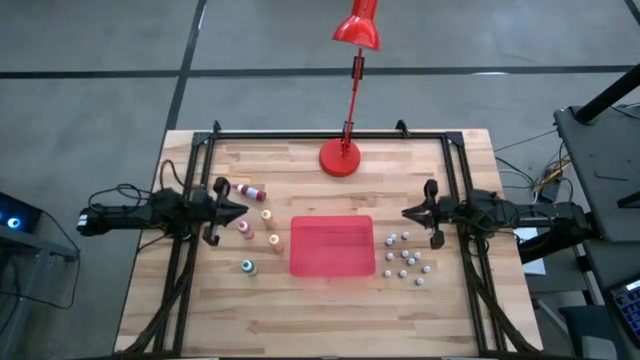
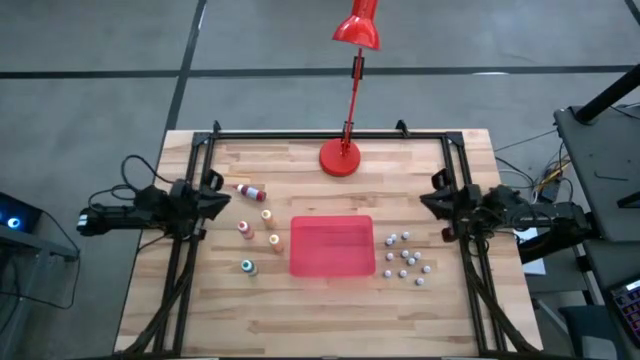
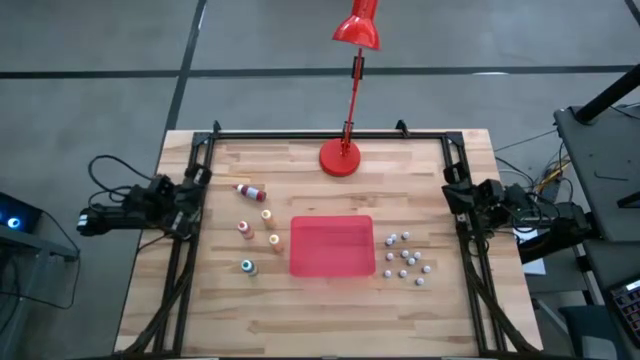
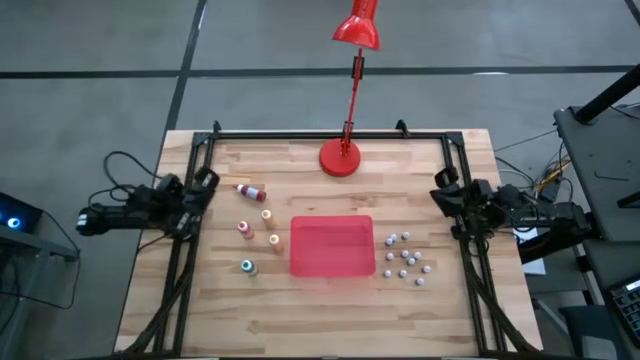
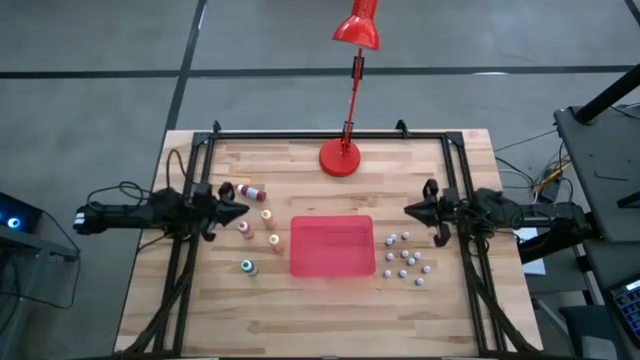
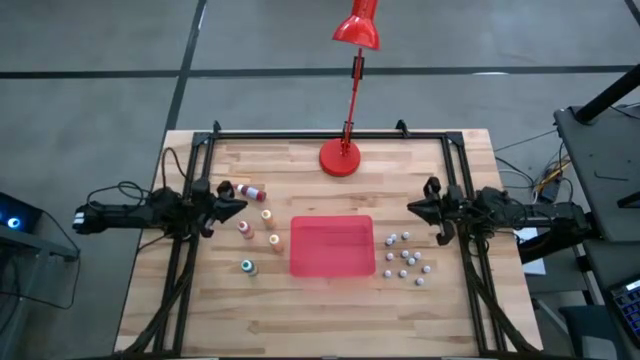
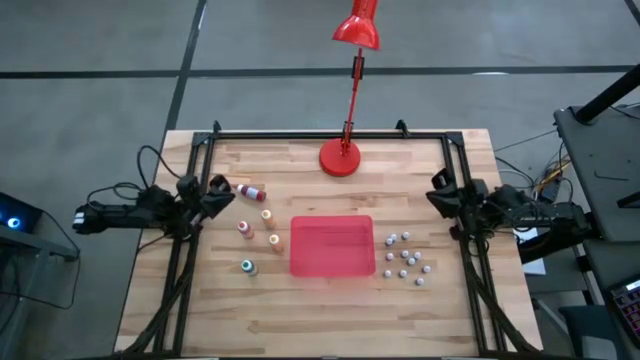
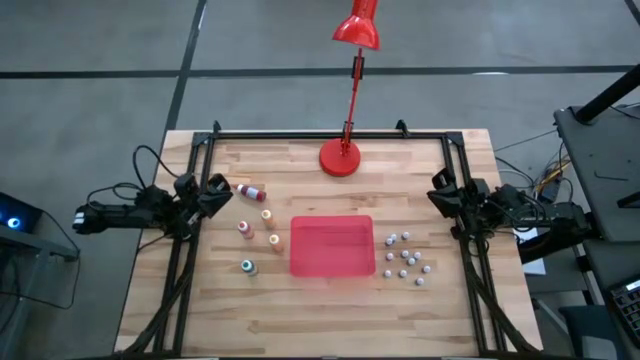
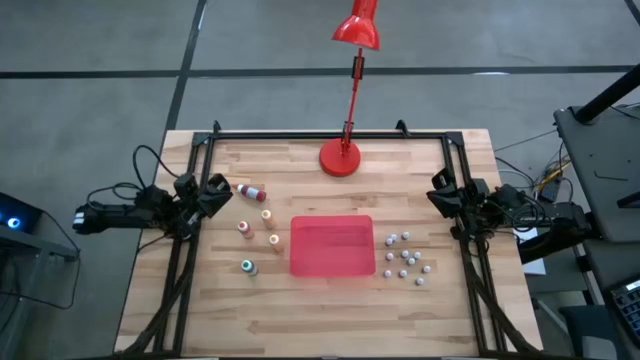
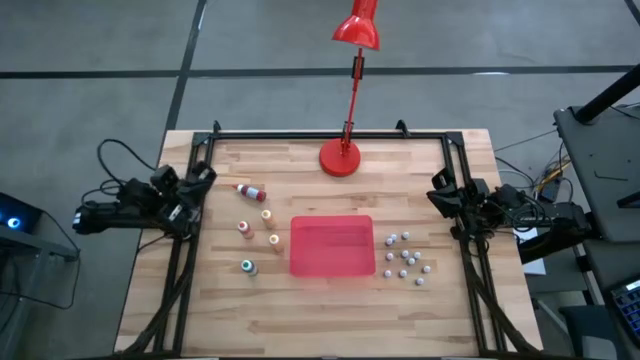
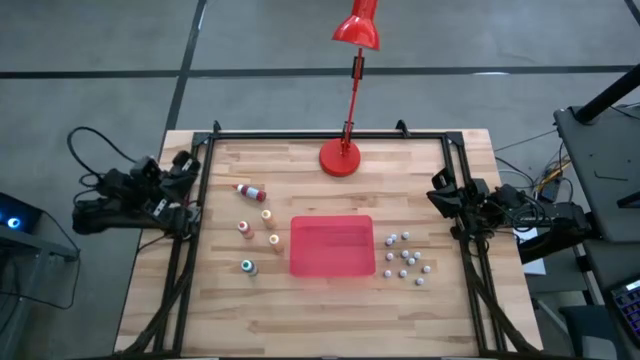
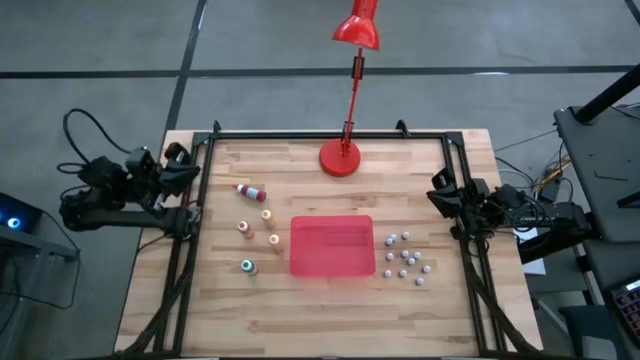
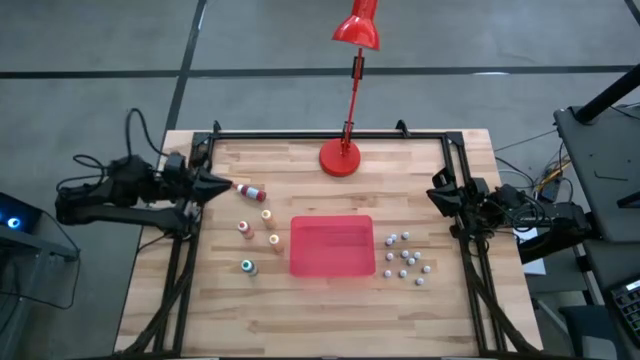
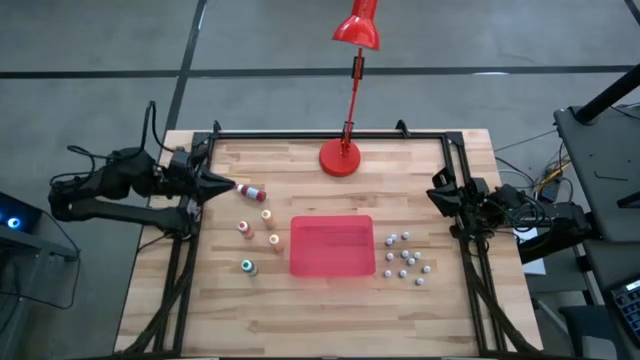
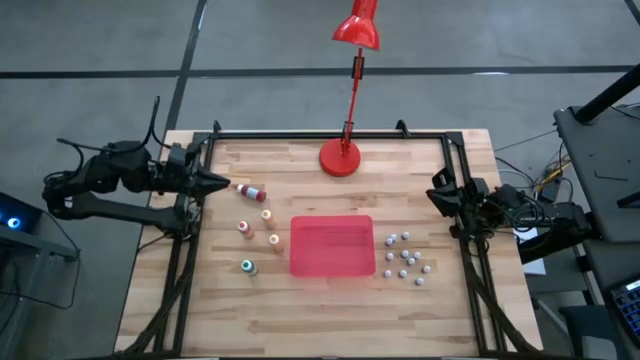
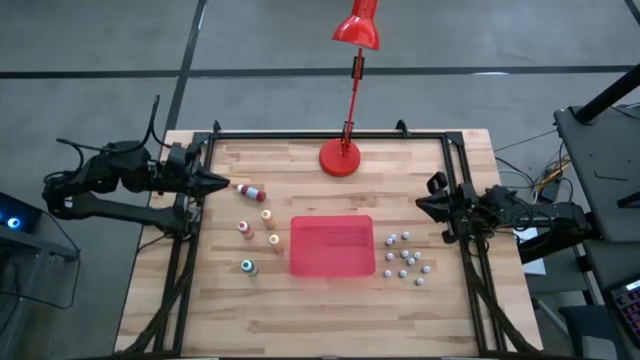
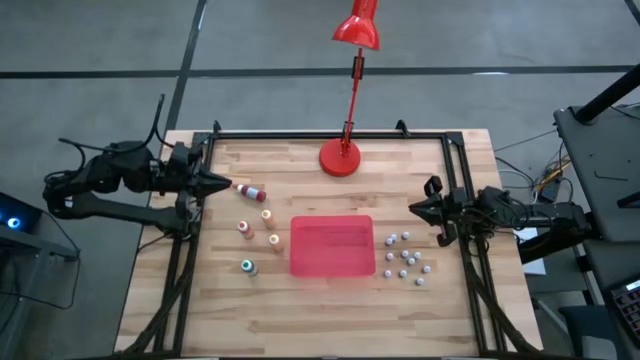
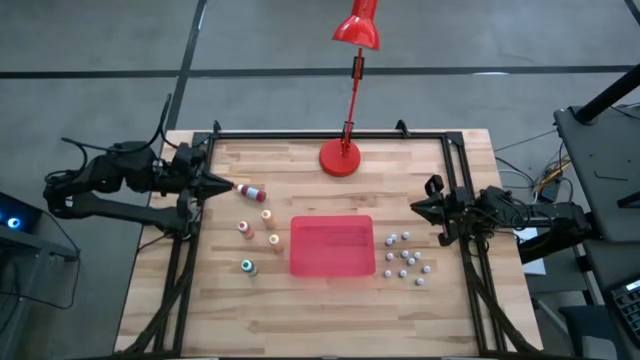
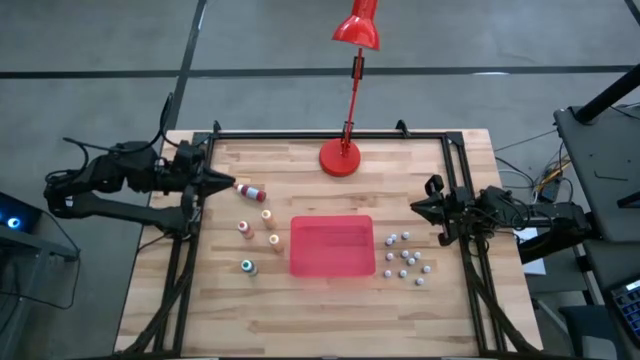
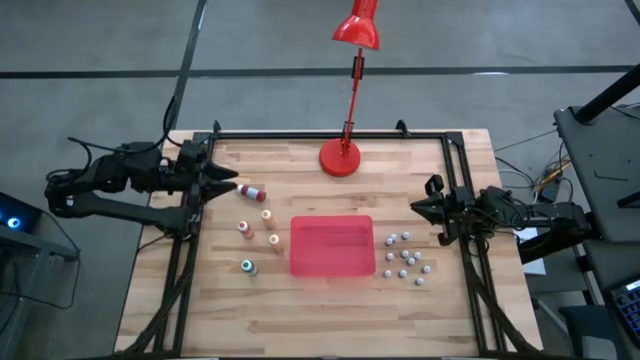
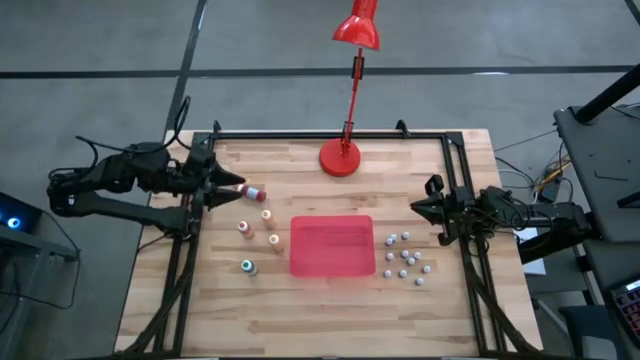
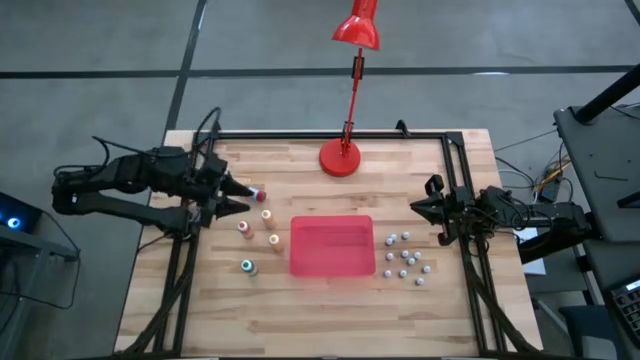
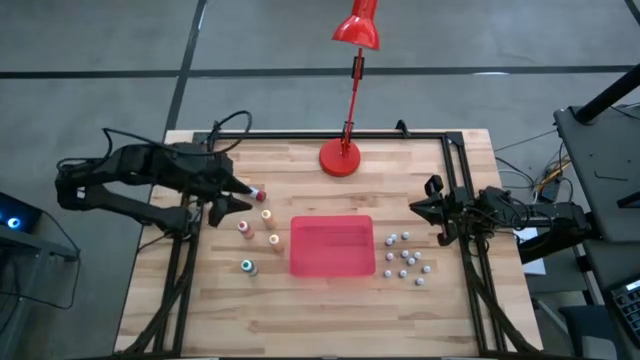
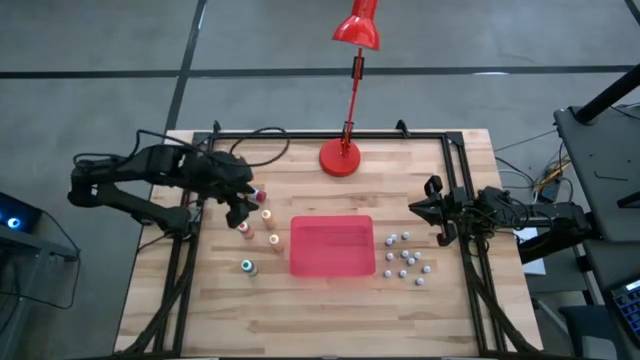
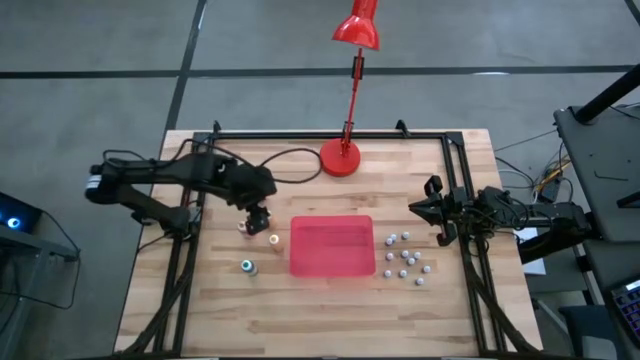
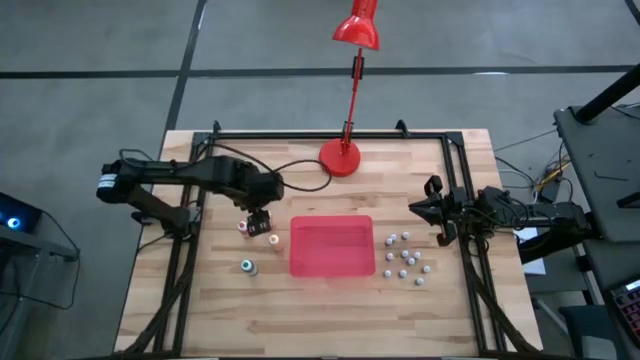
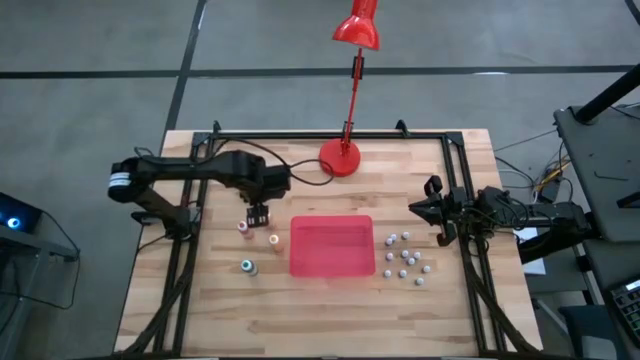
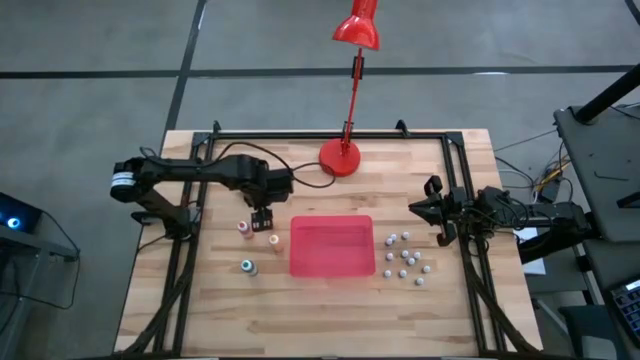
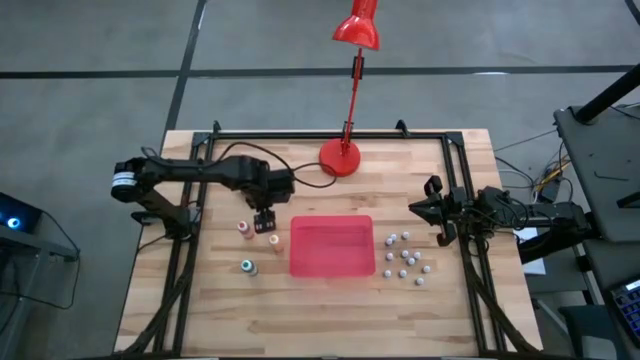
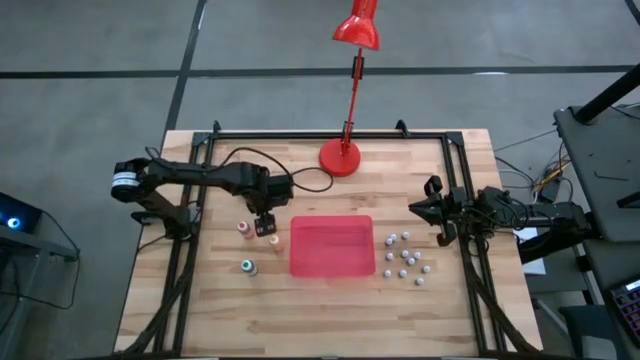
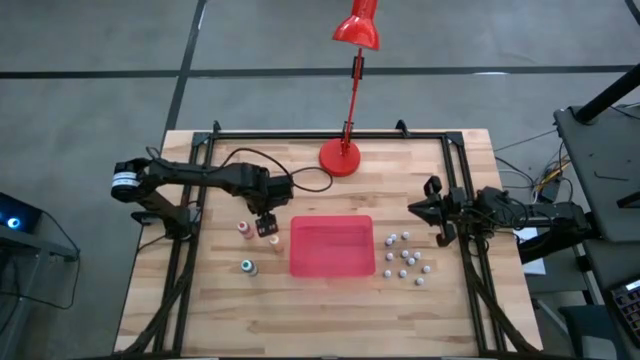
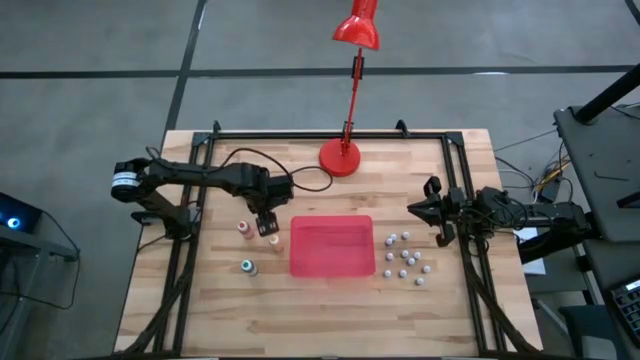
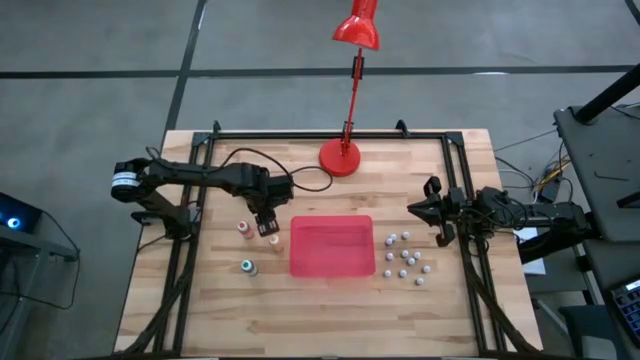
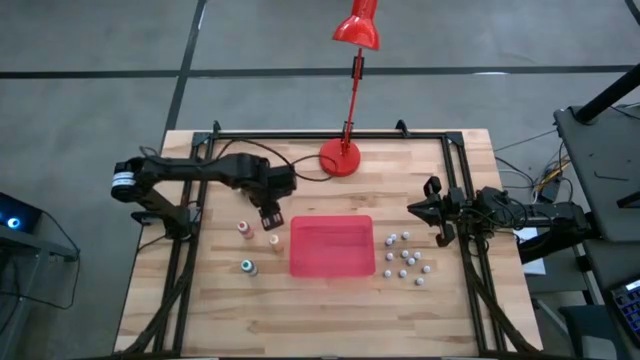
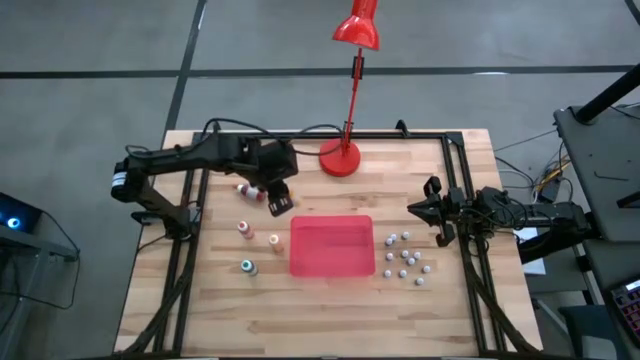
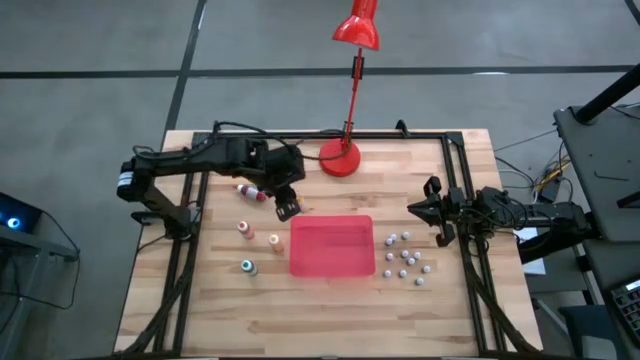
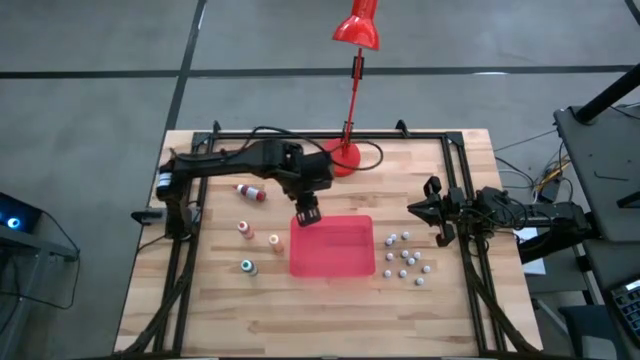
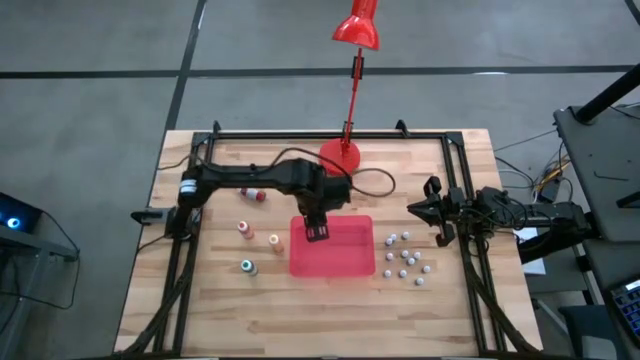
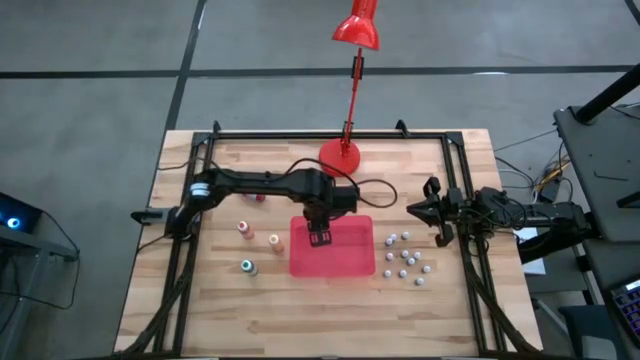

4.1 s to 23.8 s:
Task: Pick & Place food coloring
Put the top large yellow food coloring bottle into the red bin
